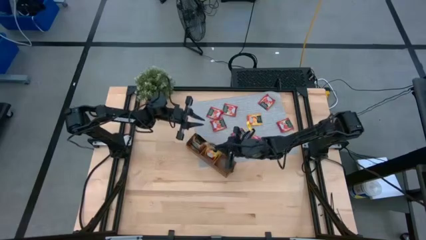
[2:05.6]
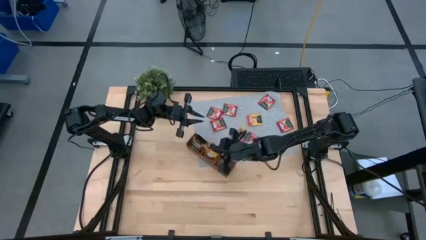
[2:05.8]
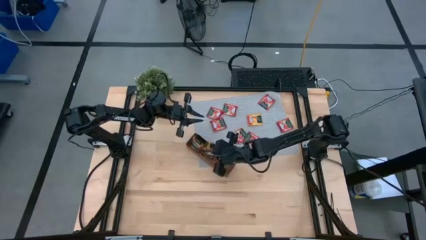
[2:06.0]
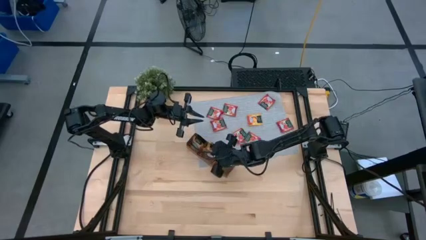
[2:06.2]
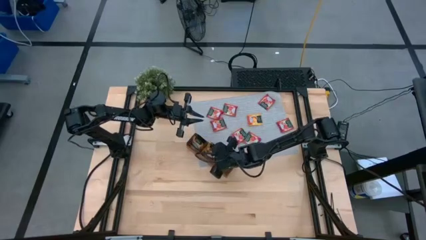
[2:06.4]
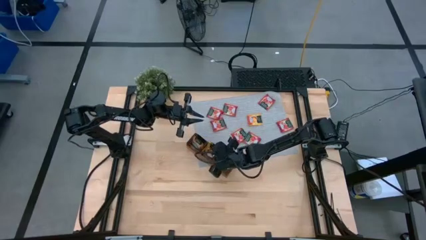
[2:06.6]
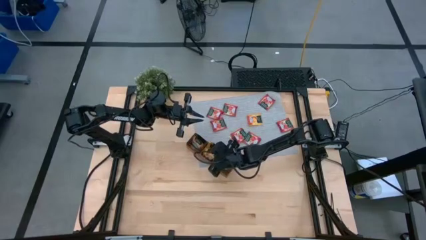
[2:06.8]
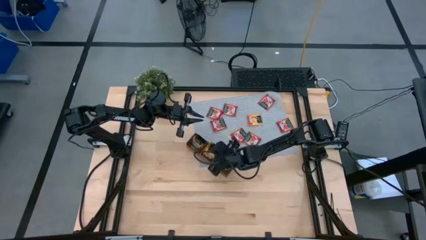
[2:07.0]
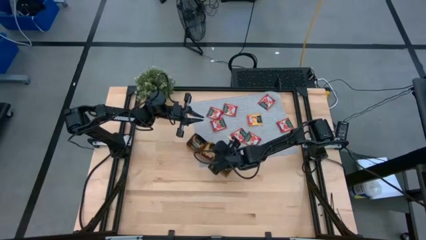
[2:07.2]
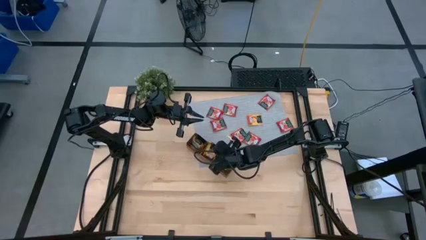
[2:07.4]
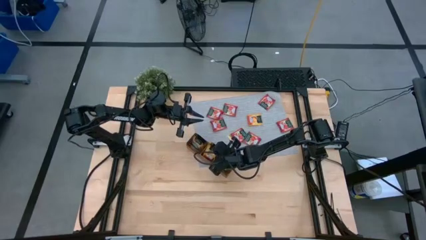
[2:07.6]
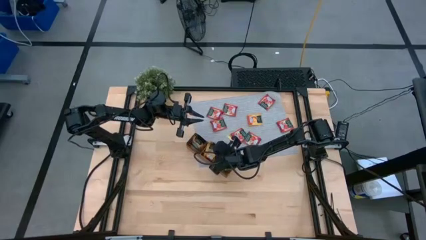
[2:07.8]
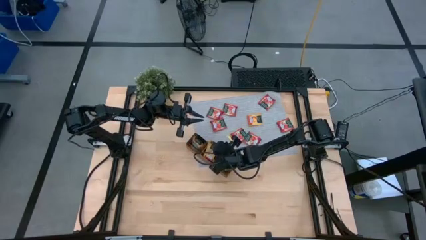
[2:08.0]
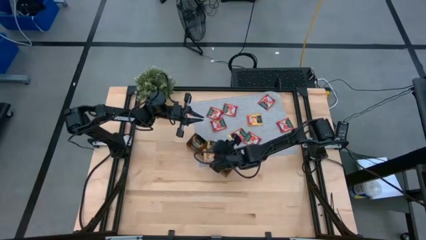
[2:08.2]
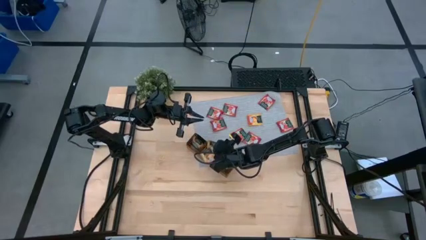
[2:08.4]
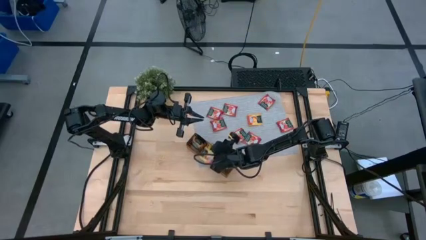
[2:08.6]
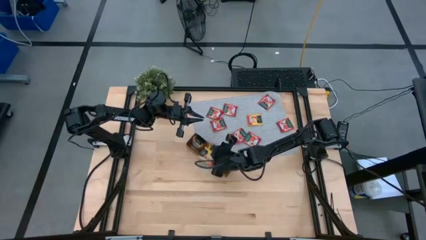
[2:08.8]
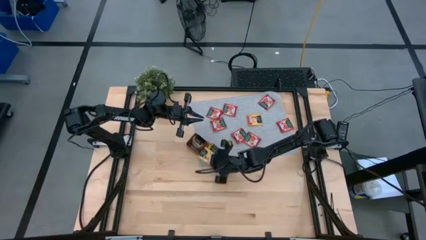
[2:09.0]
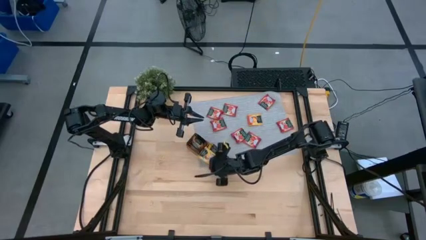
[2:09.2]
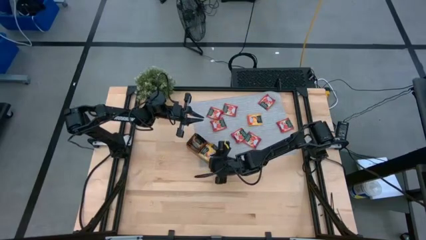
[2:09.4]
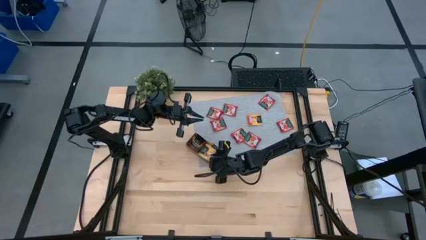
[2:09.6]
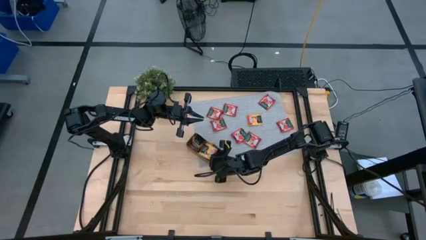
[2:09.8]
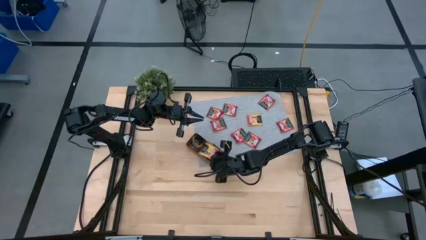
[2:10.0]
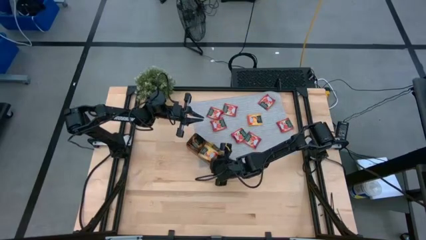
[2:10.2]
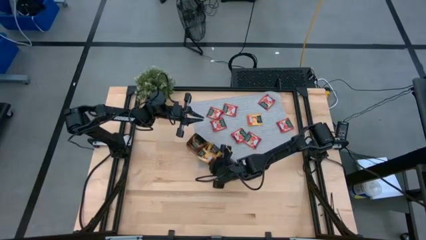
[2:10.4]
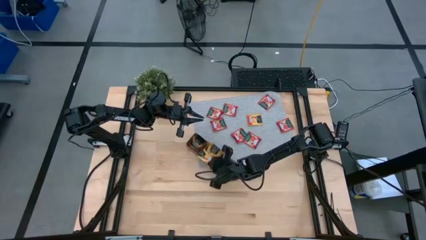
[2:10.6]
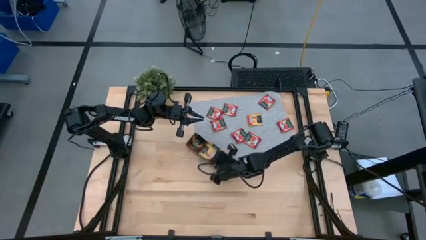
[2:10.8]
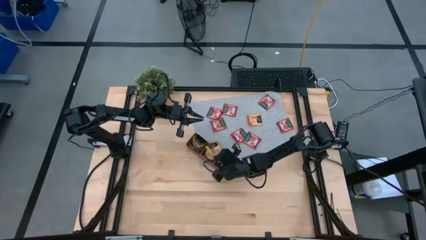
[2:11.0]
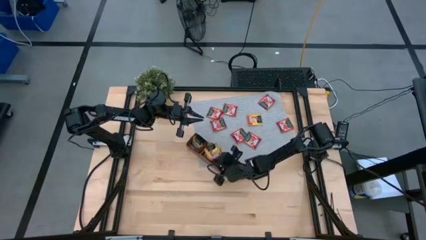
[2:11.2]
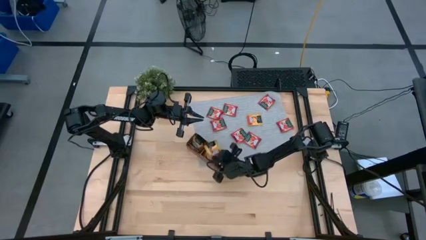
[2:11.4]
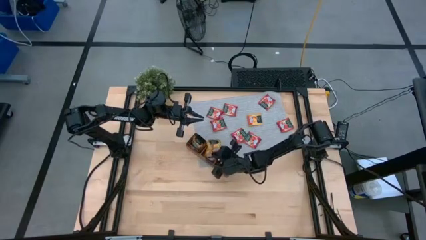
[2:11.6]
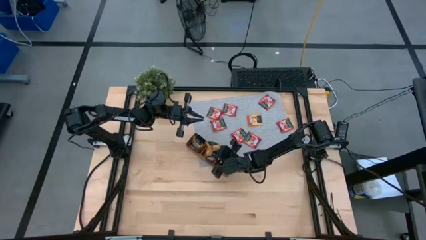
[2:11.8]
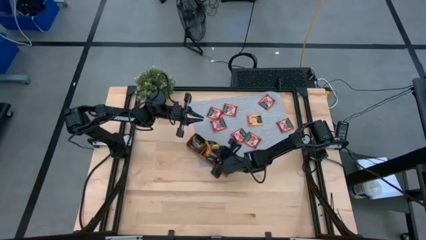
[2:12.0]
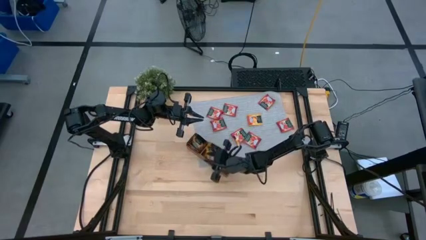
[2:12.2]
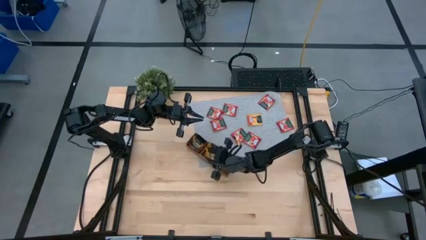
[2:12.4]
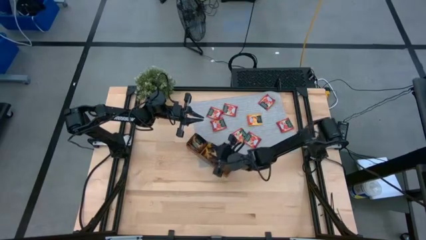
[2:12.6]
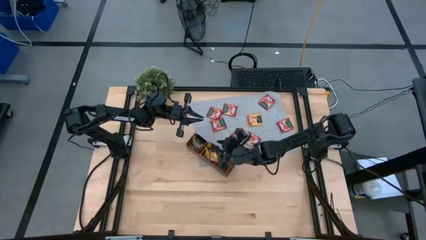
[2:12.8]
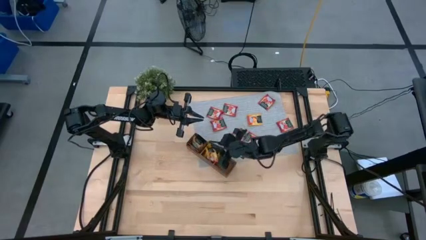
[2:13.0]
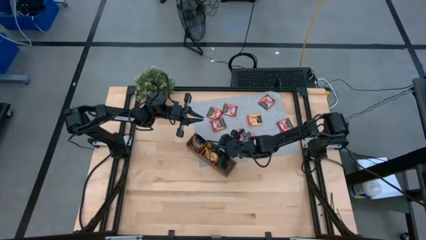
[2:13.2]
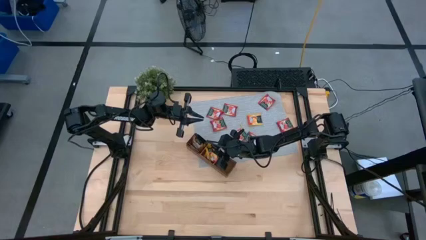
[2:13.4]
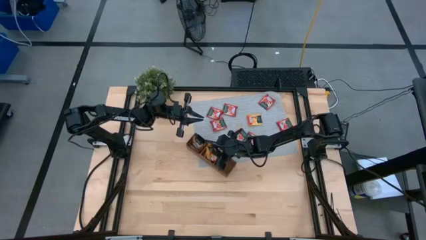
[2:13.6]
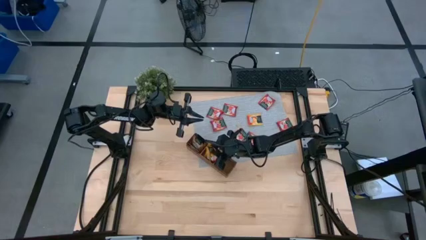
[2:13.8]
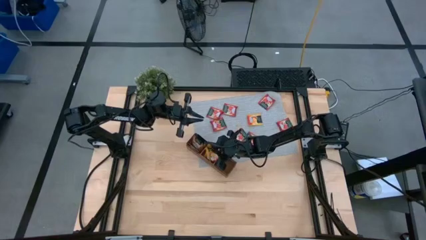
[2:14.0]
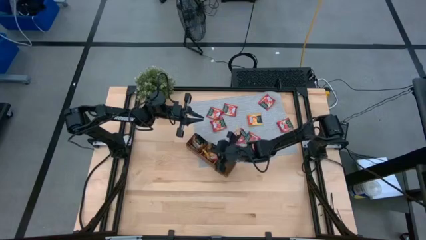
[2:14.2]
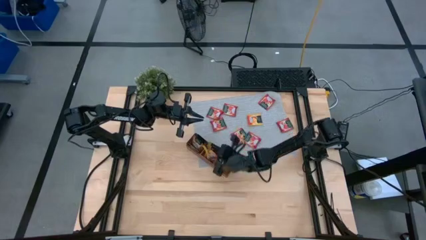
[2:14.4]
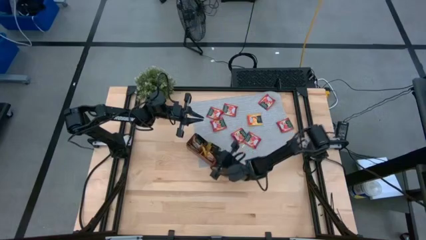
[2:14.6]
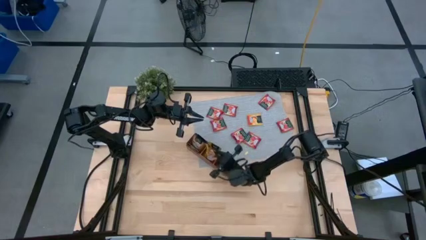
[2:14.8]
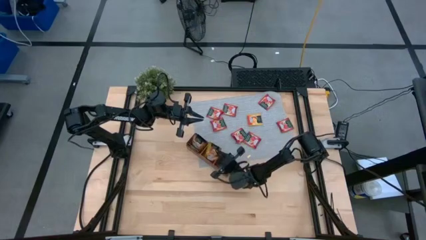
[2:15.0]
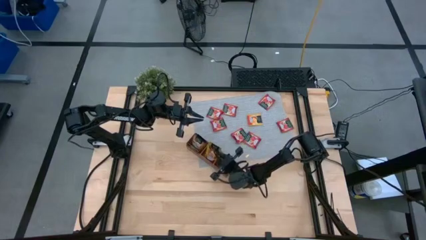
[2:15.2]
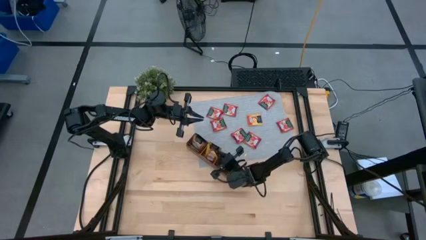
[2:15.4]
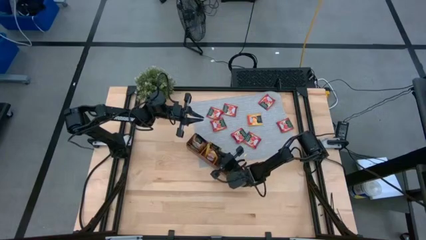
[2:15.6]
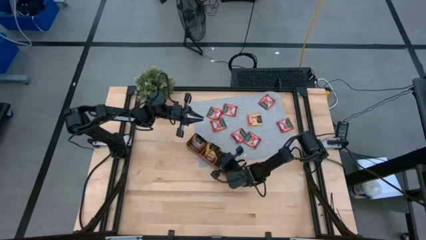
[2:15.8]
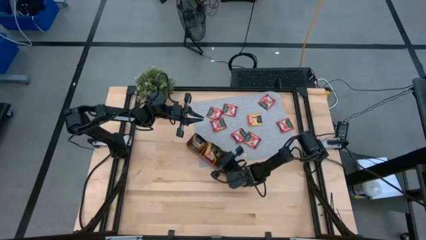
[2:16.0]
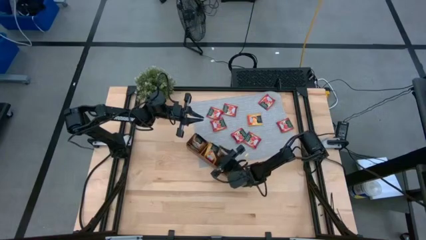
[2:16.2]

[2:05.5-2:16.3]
Task: Pick & Place Tea
Put the yellow tea bag into the middle section of the wooden organizer

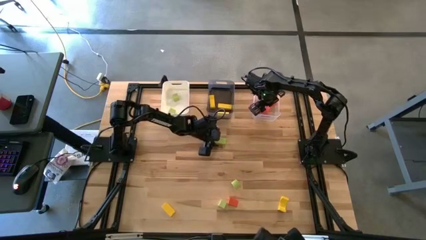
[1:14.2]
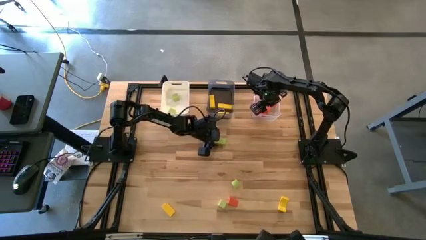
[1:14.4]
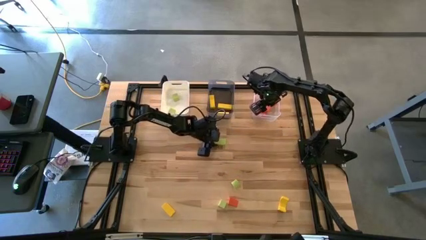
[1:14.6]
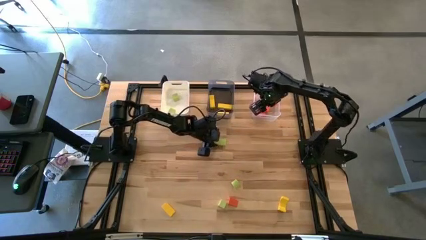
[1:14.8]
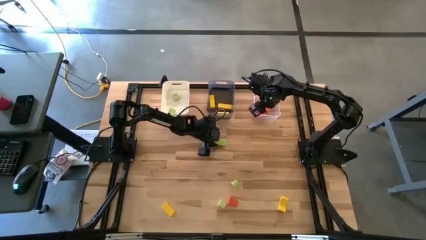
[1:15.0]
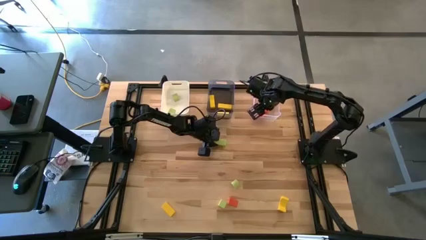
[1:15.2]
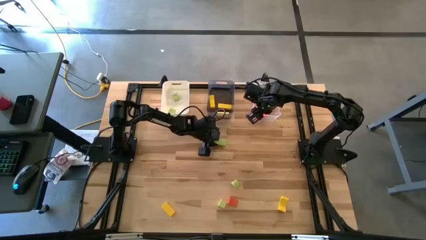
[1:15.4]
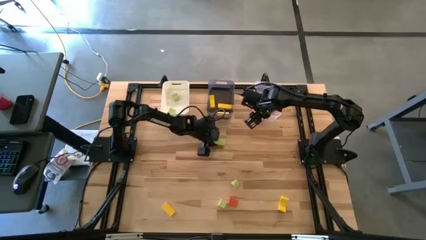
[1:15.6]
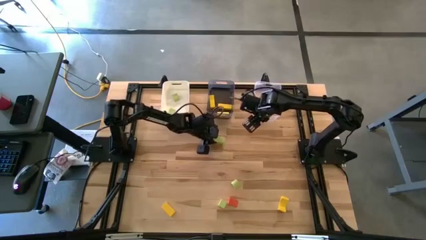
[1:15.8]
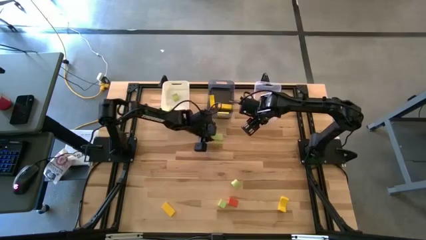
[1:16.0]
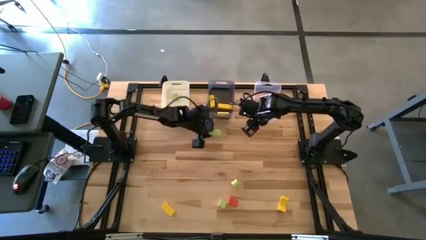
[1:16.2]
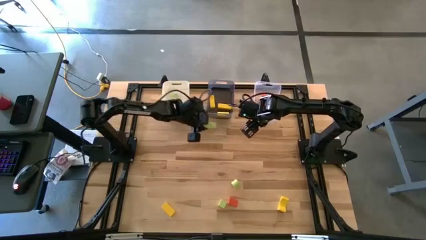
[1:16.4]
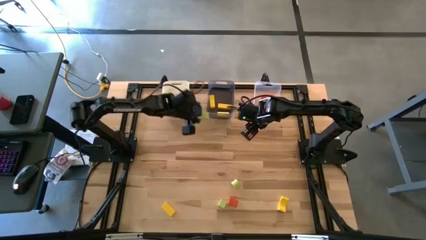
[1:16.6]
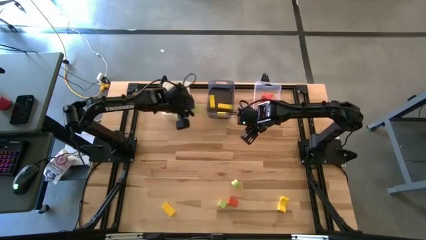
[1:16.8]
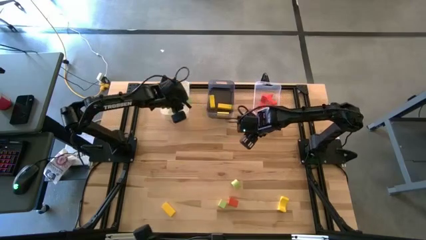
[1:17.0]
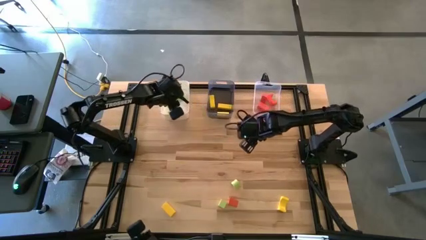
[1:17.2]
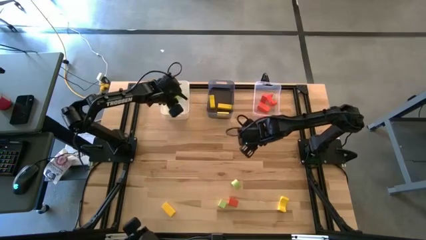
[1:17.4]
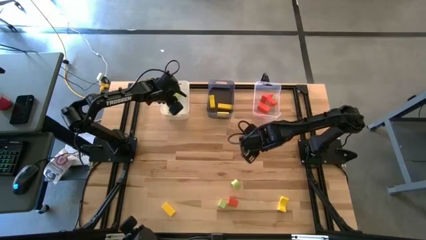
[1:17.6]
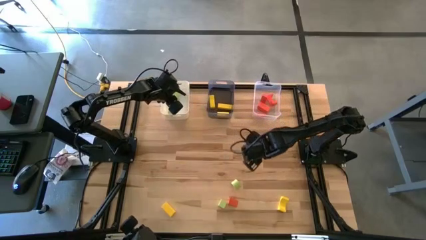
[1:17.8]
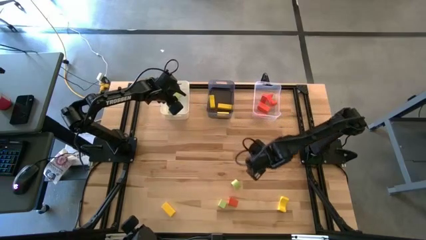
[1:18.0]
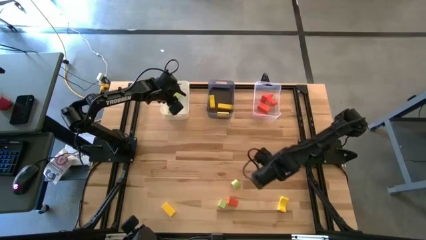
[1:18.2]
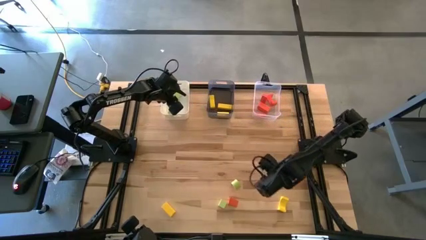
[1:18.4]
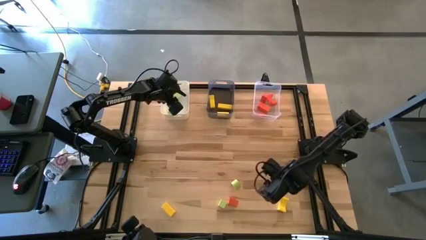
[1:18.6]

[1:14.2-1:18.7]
Task: Sort & place blocks by color
Put the green block into the white bin
